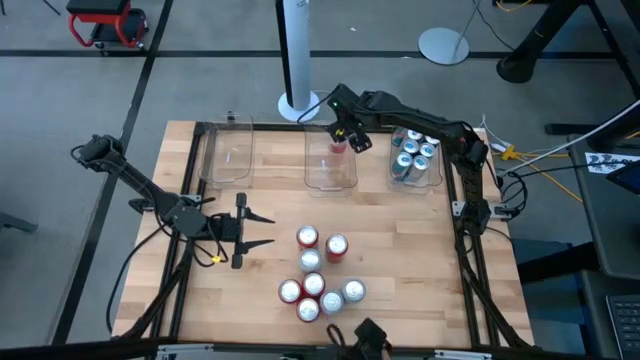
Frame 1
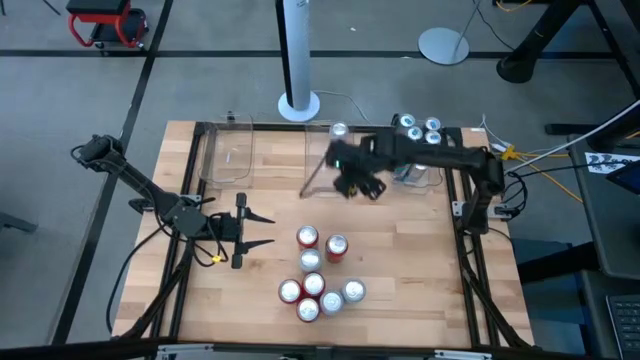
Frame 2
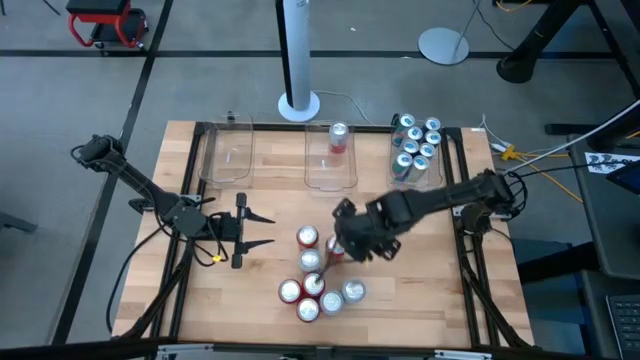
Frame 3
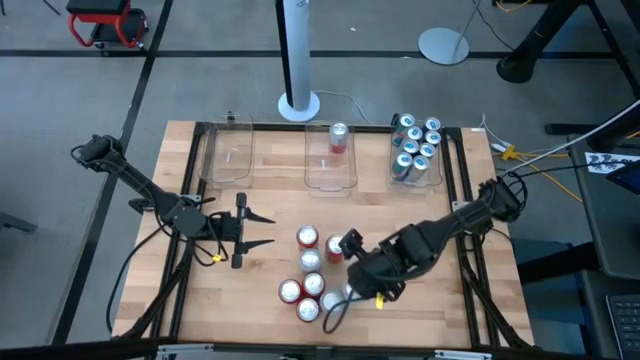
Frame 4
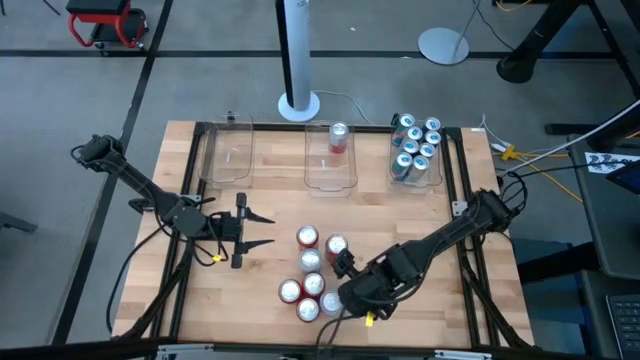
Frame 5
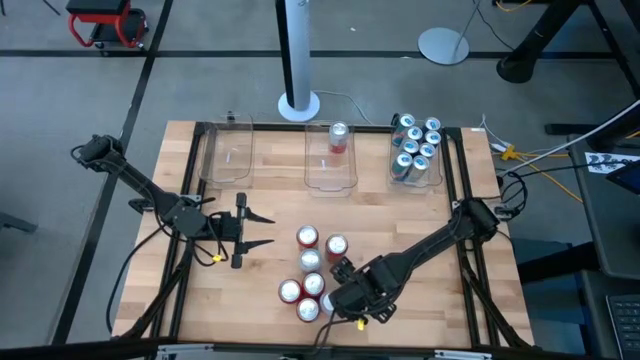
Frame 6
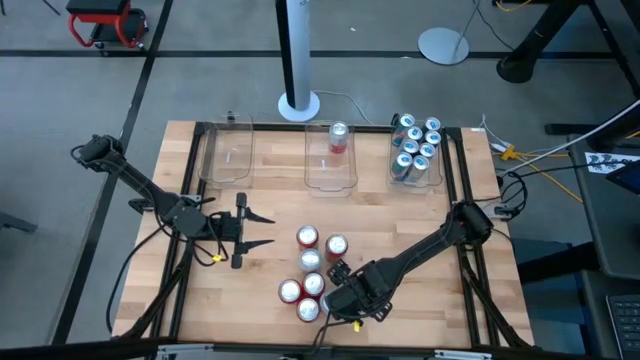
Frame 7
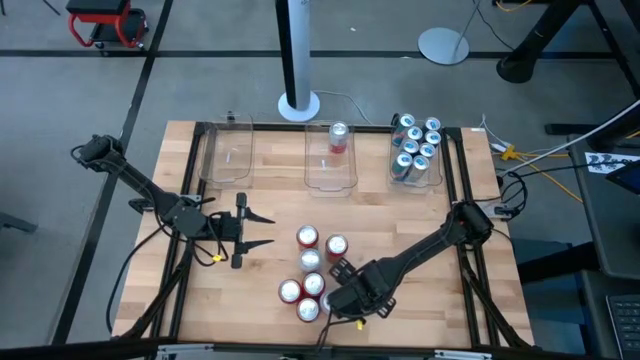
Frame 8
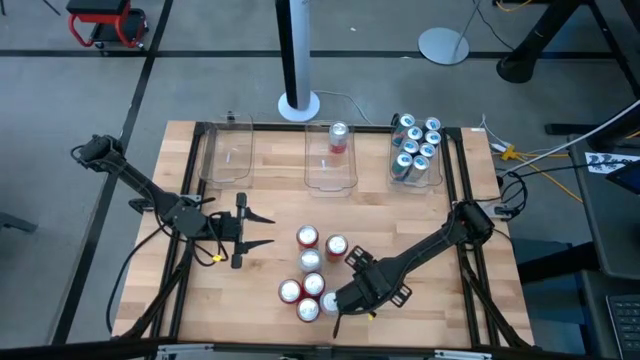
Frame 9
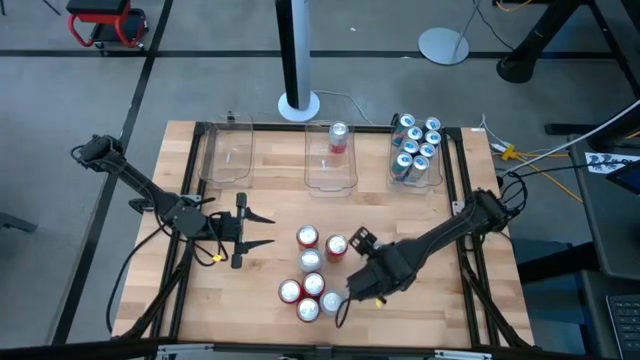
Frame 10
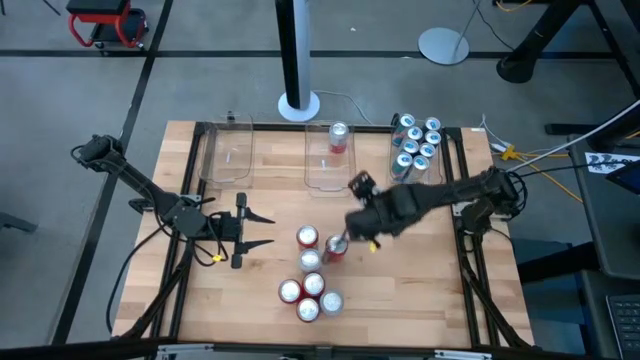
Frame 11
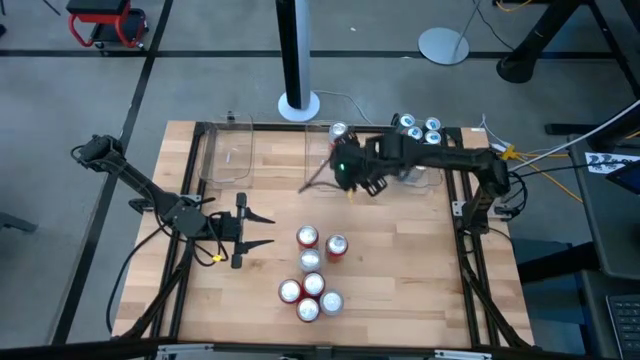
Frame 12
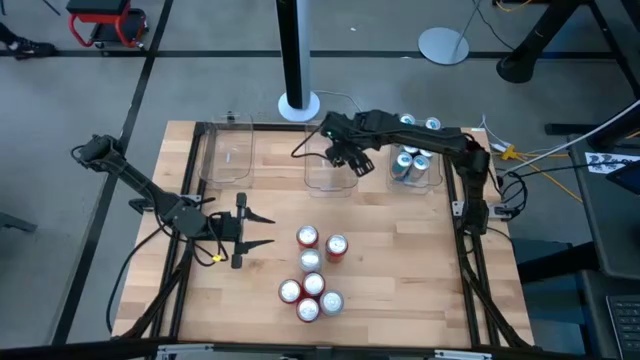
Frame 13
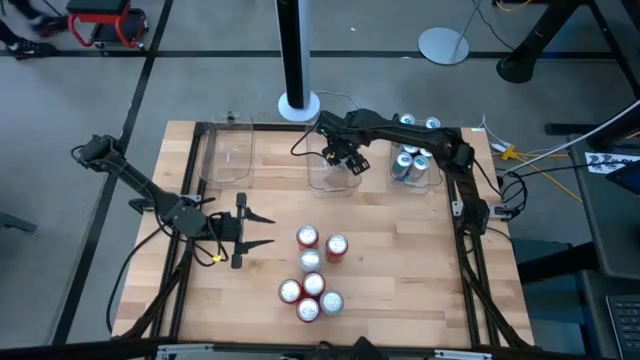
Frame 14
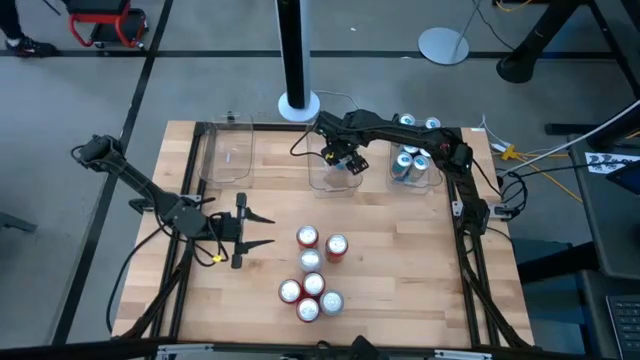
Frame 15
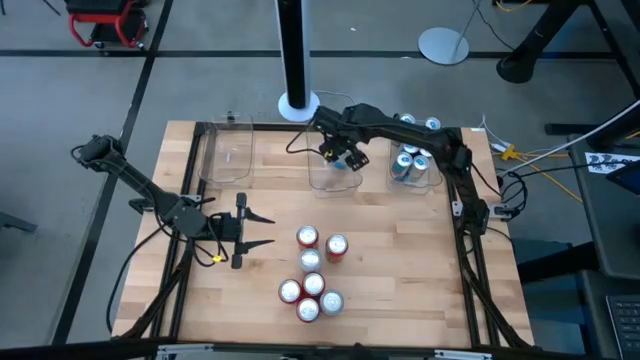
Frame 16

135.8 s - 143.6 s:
Task: Sort soda cans
Put the blue soda can into the center transparent bin

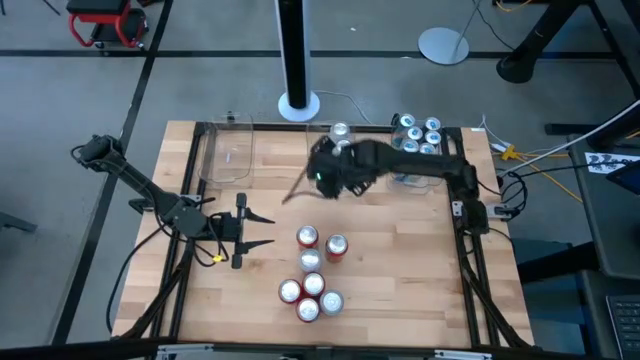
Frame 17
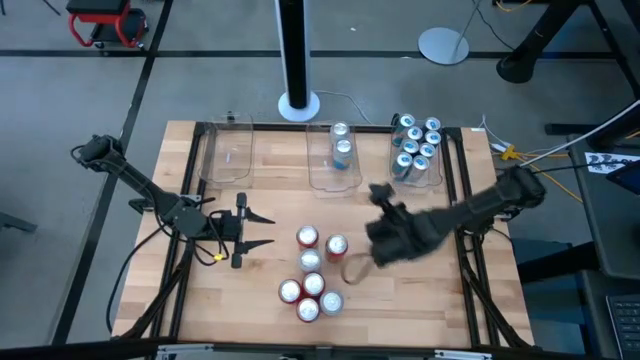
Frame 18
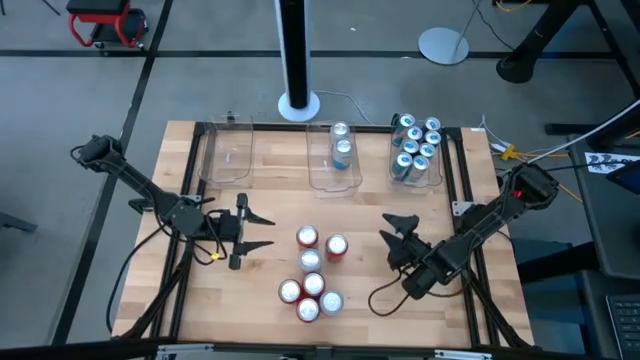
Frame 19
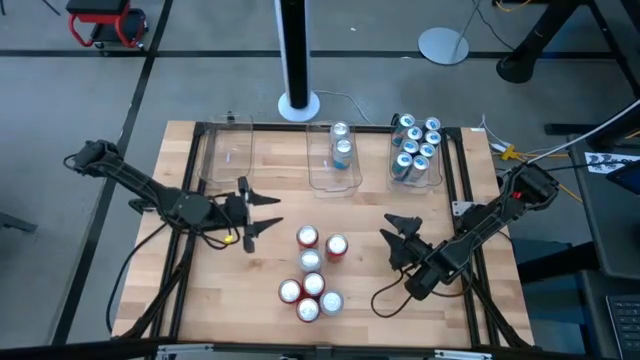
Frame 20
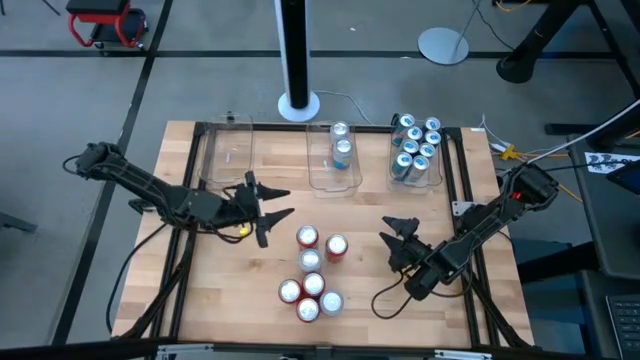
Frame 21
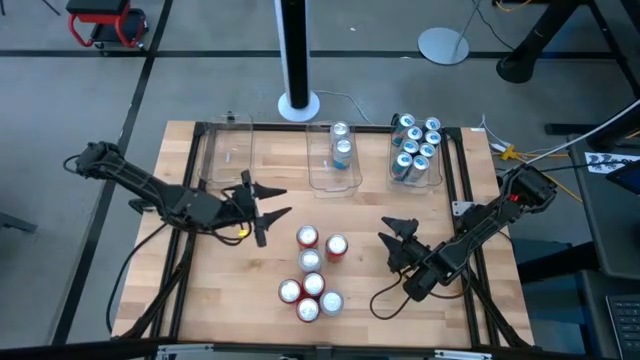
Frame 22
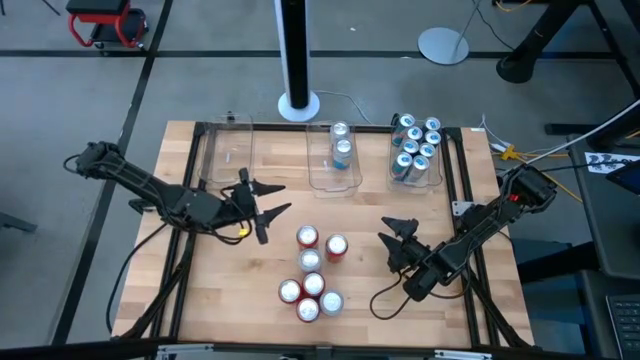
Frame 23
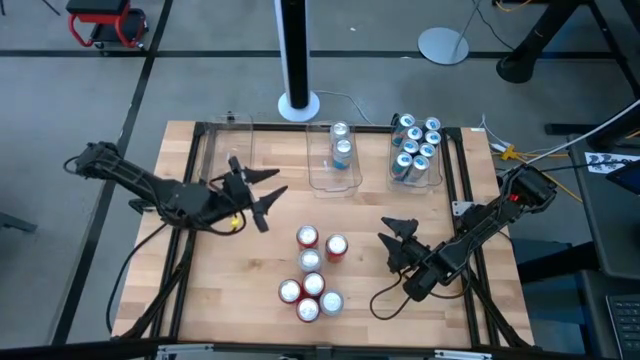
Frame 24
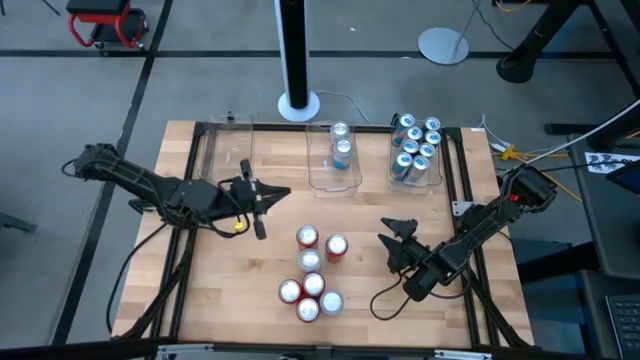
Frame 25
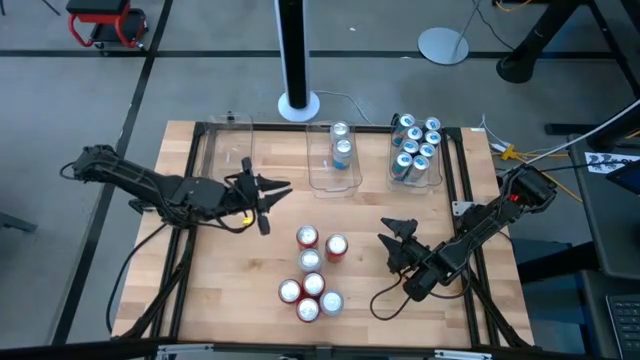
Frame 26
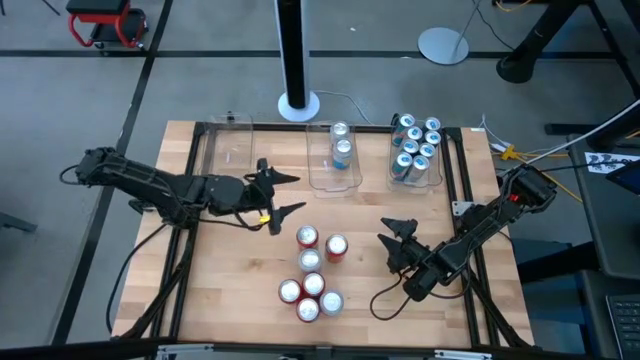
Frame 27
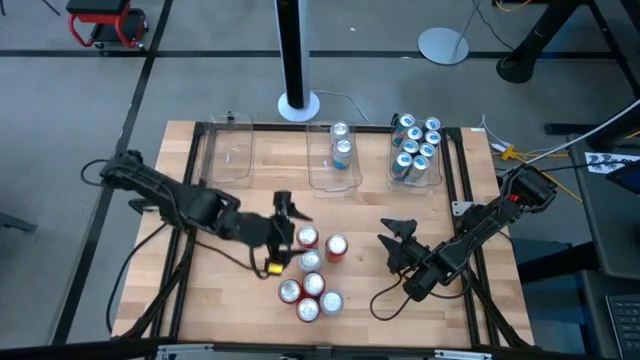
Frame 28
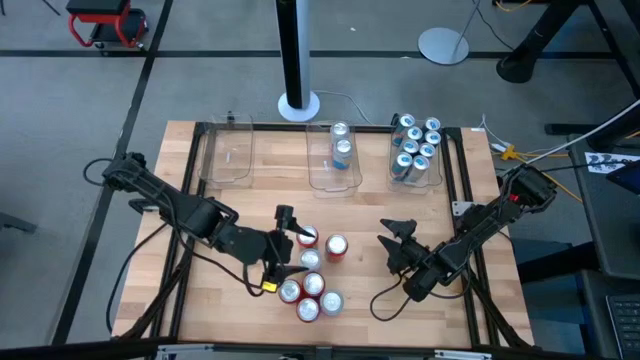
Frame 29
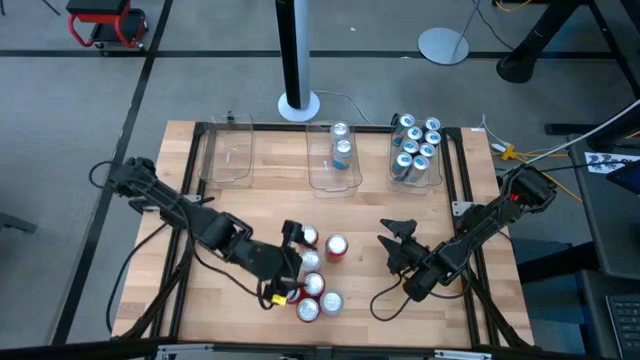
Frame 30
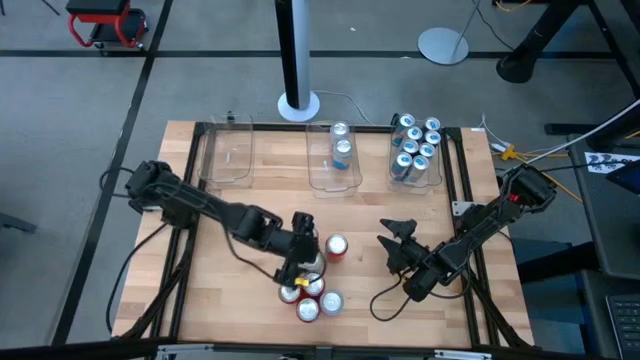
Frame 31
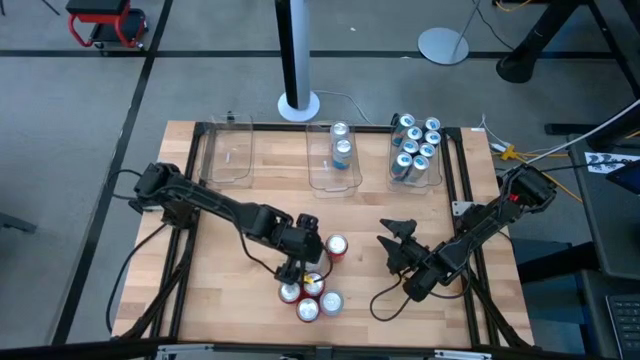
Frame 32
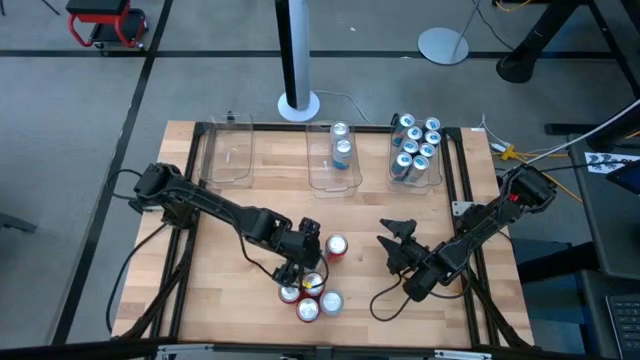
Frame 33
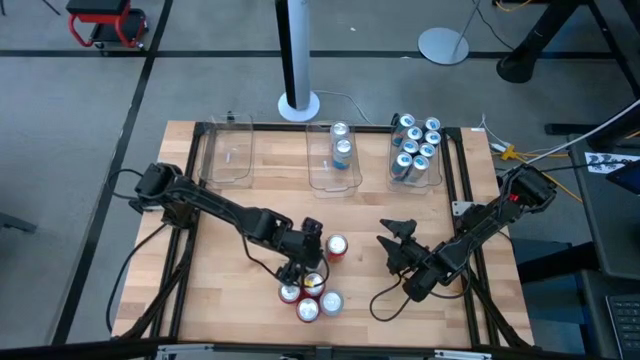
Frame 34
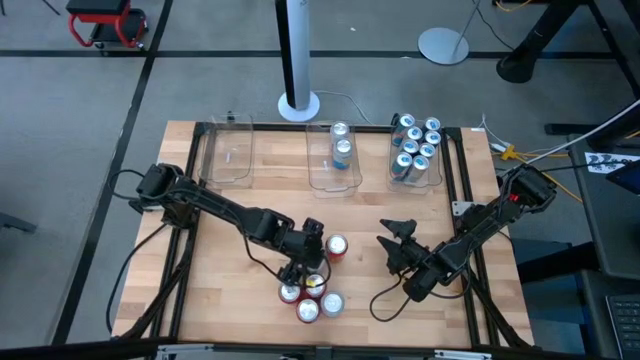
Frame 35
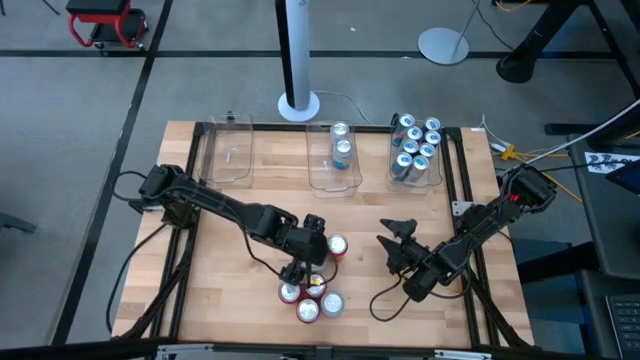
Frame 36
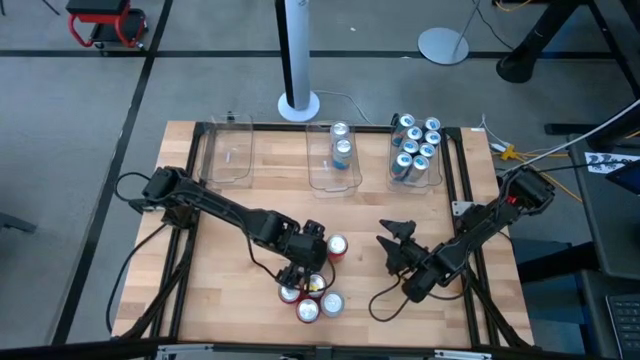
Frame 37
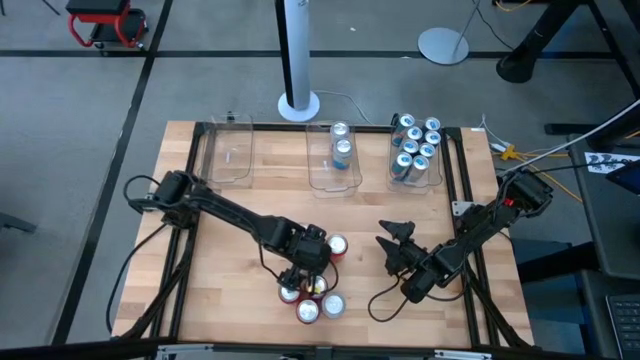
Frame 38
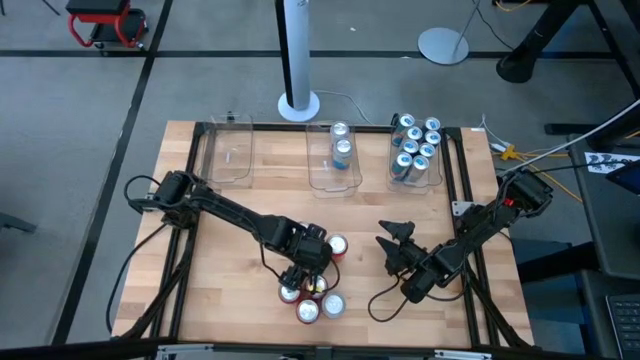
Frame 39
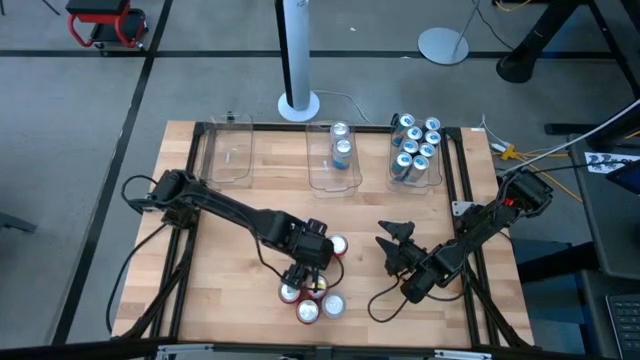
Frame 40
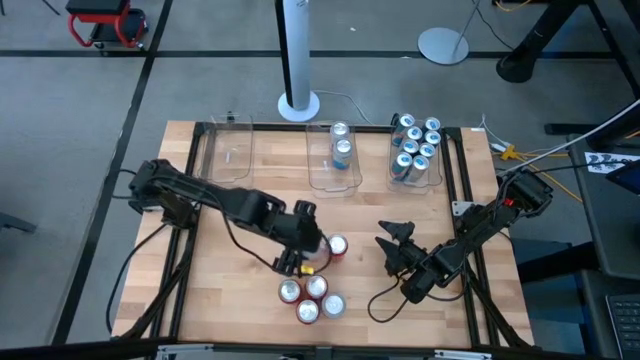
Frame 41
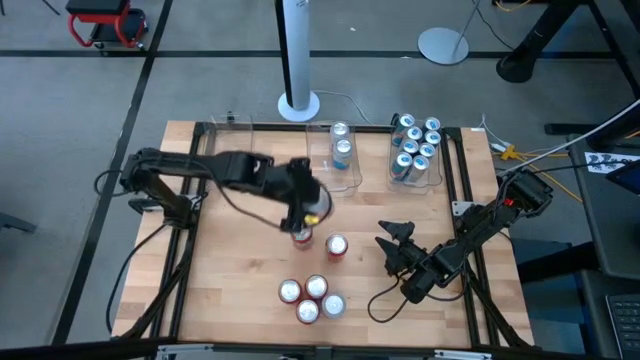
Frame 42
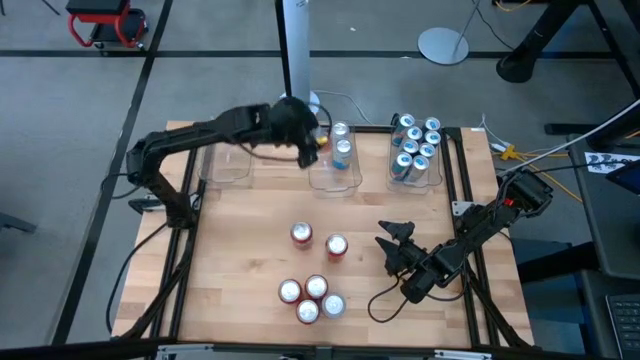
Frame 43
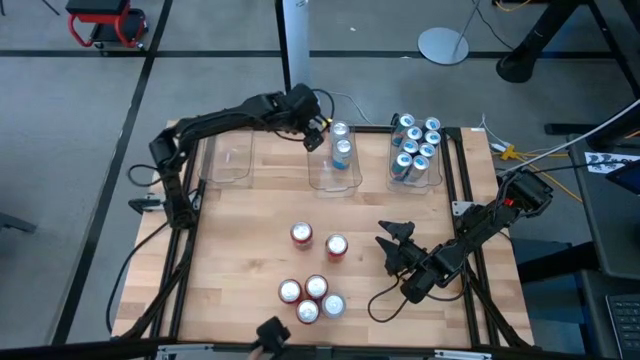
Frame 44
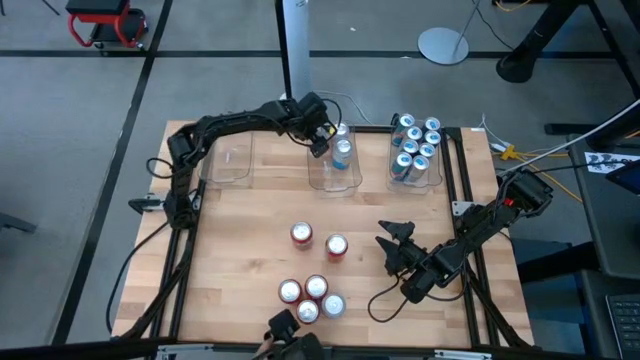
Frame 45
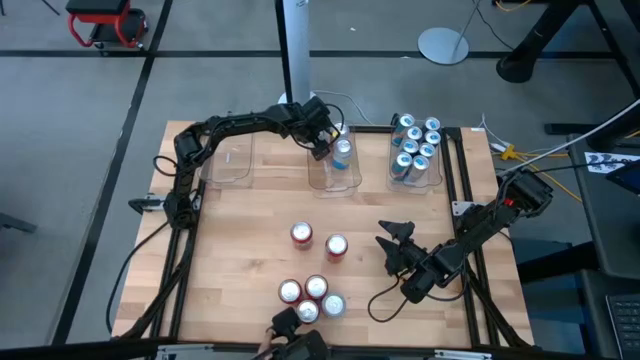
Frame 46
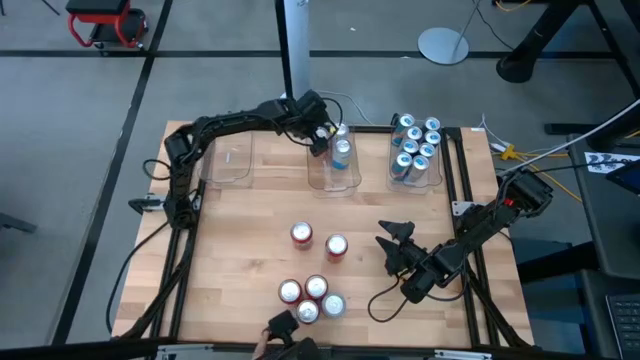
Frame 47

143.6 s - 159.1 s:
Put the white yellow soda can into the center transparent bin
